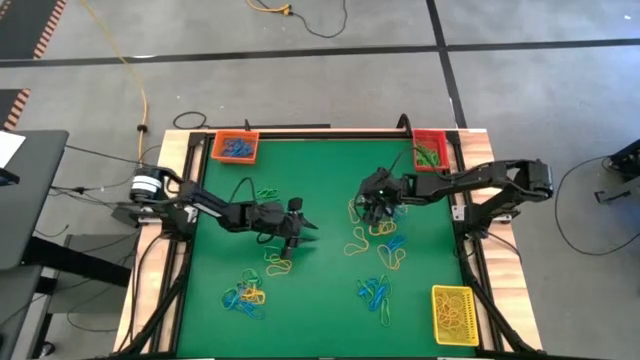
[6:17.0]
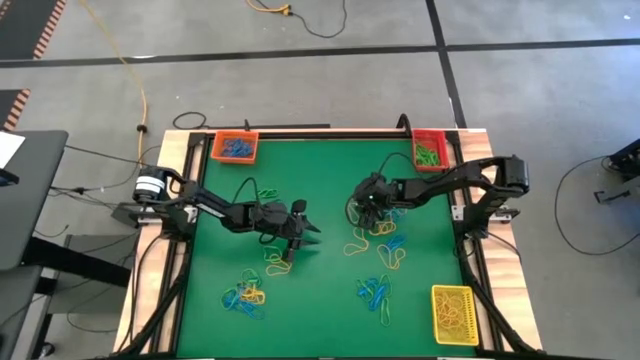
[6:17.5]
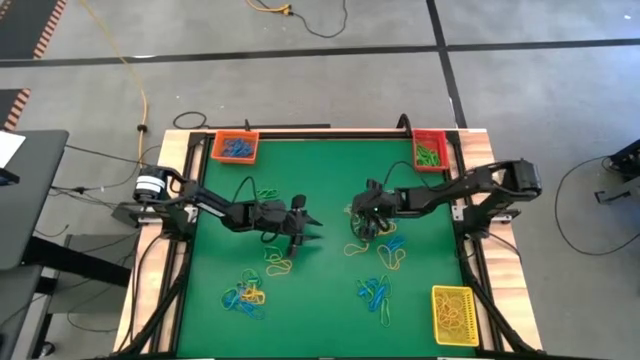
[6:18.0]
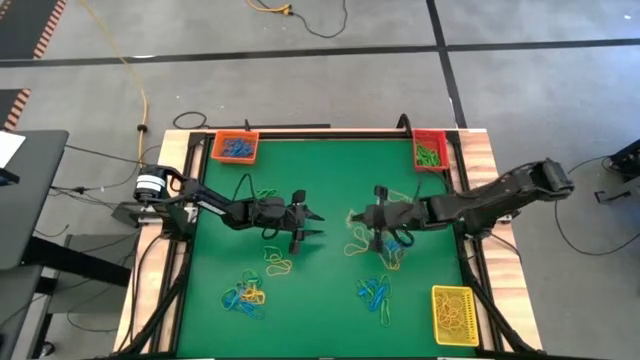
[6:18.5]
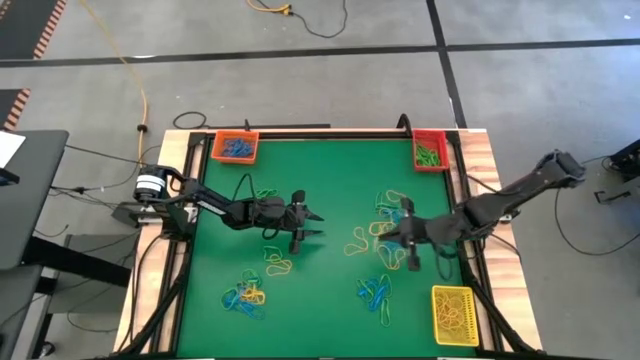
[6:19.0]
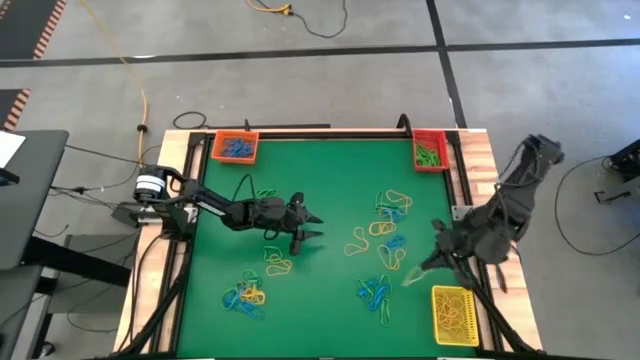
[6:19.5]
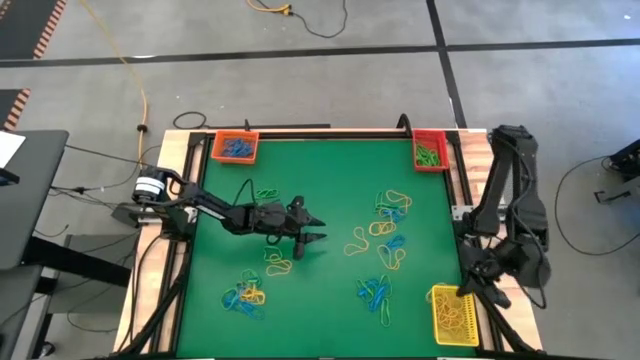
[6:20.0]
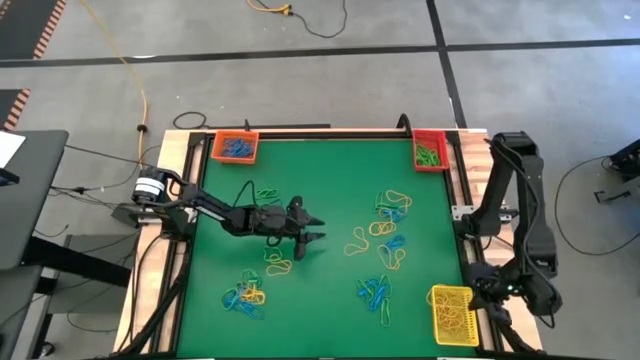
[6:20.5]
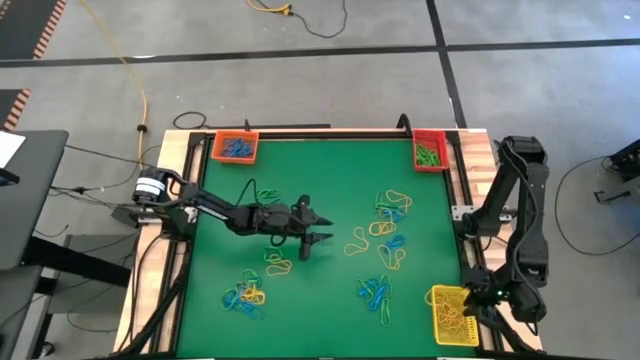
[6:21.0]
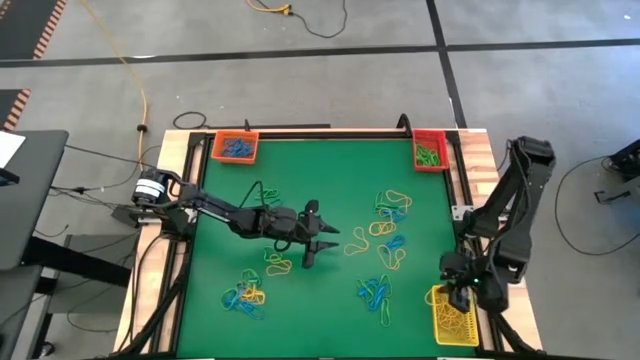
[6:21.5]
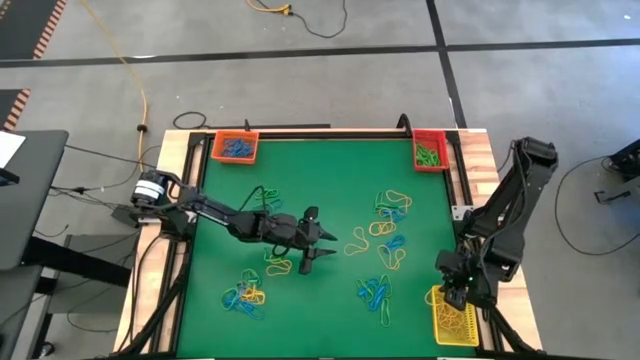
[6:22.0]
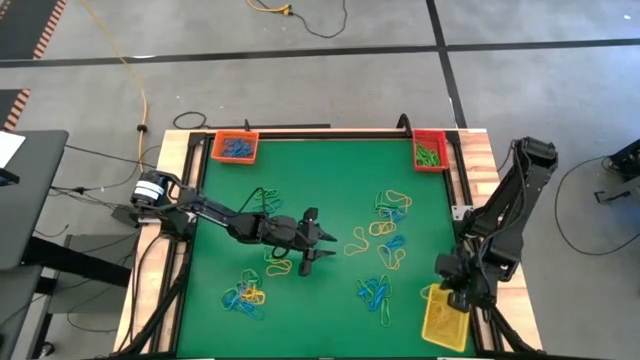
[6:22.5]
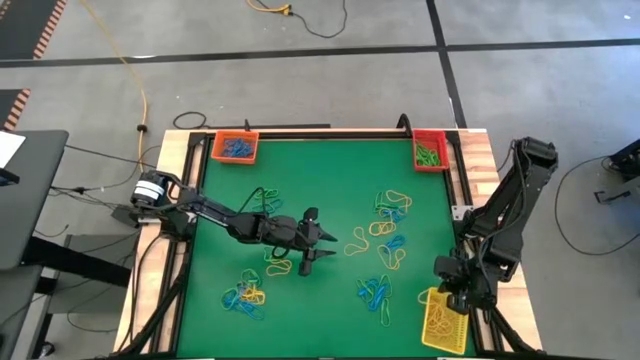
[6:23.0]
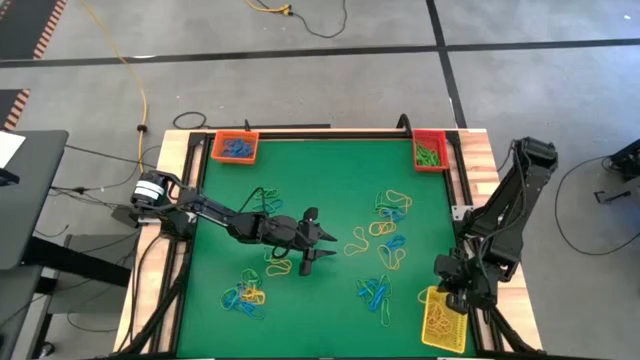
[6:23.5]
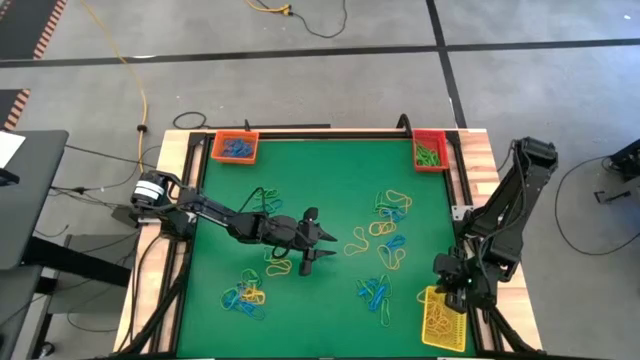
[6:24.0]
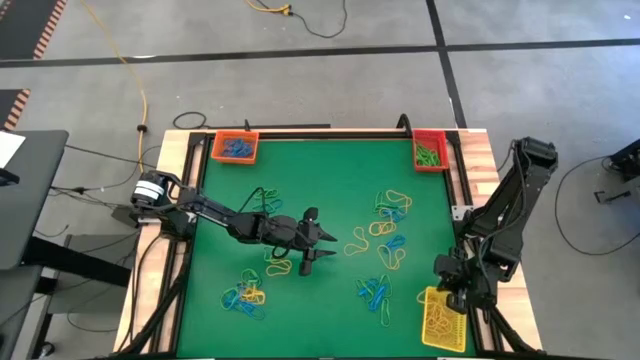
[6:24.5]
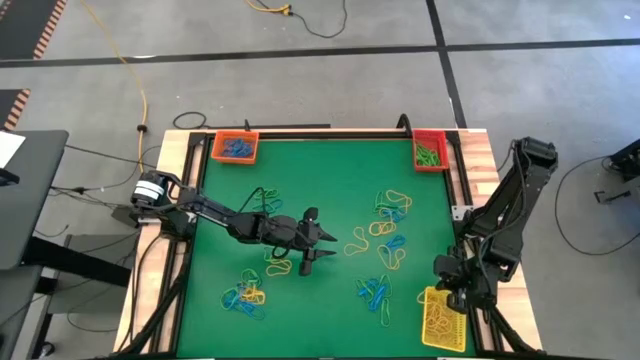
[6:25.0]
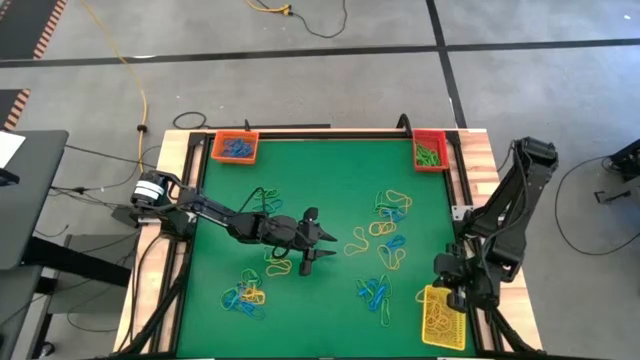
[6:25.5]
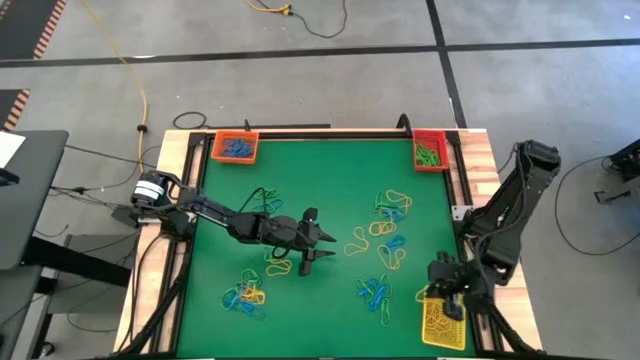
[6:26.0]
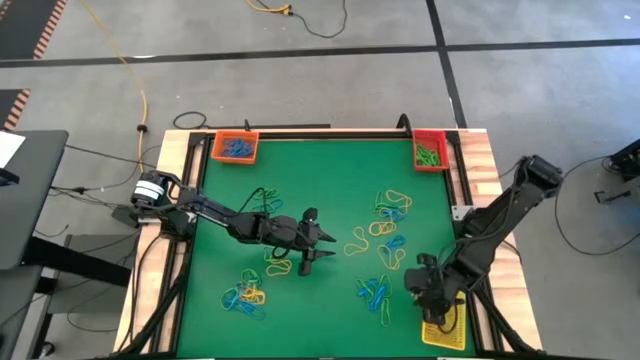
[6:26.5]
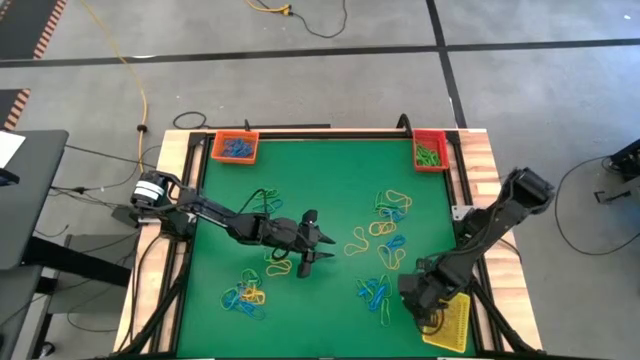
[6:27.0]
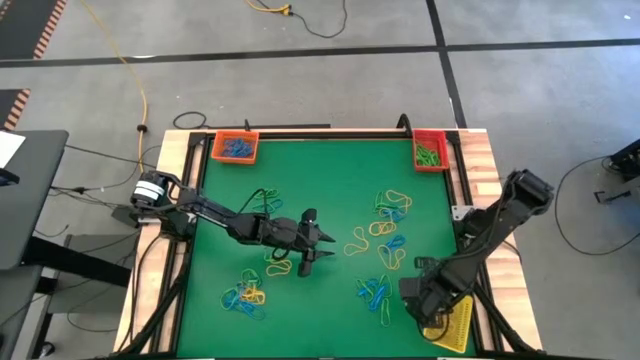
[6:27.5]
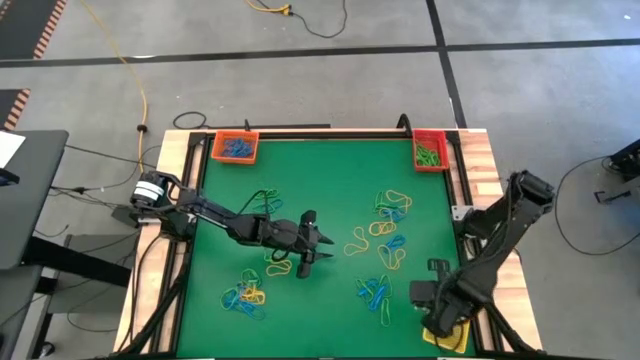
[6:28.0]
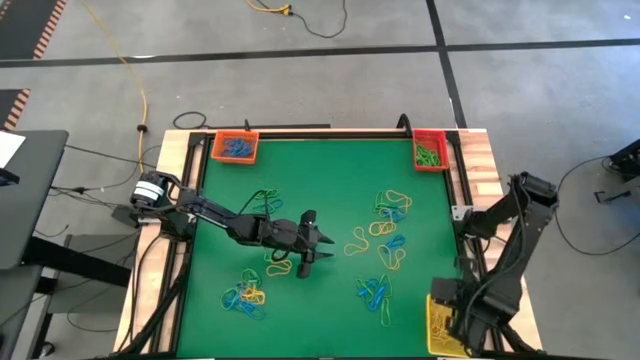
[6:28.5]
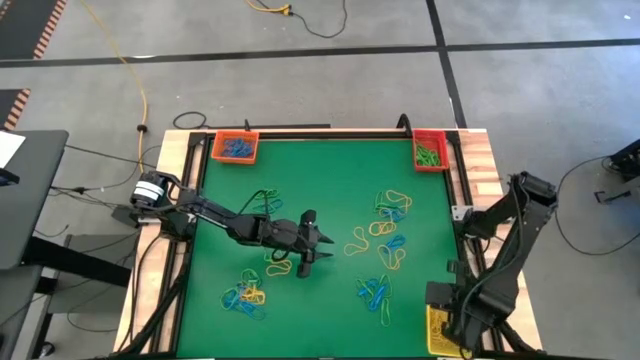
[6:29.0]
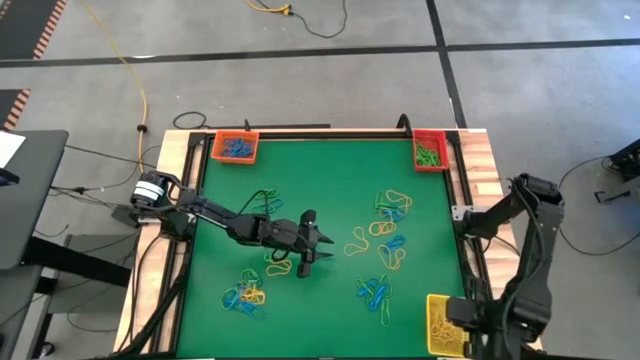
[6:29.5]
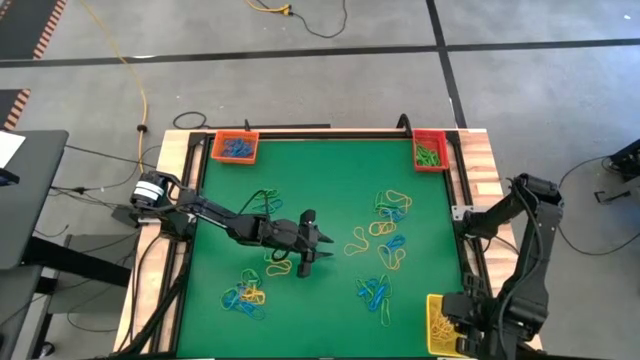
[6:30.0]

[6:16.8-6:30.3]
Task: Sort rubber bands into baskets
Put the top right yellow rubber band into the yellow bin

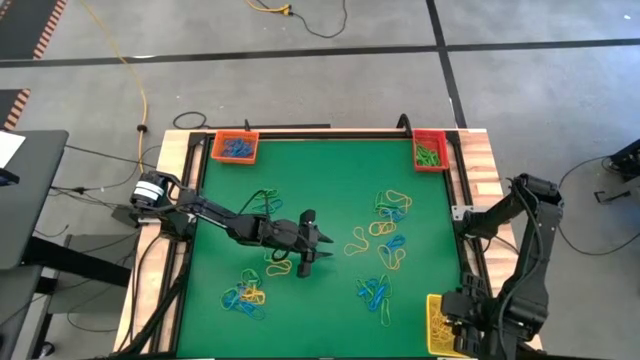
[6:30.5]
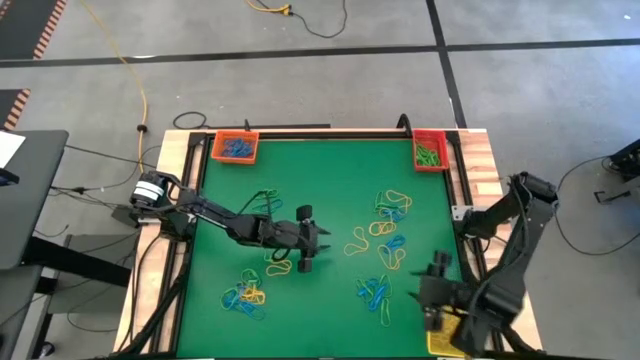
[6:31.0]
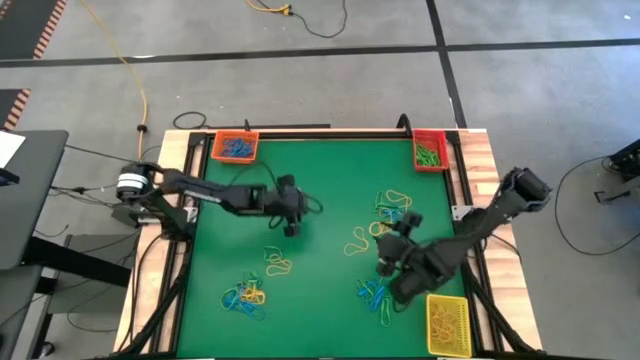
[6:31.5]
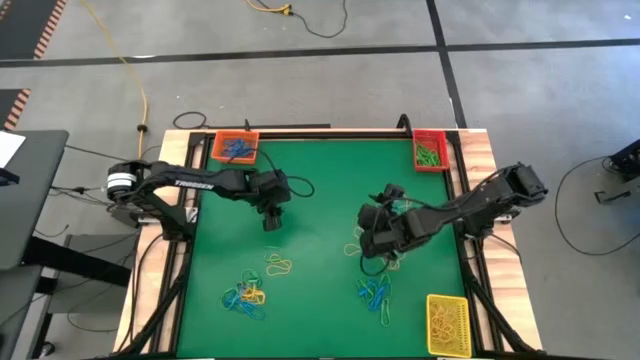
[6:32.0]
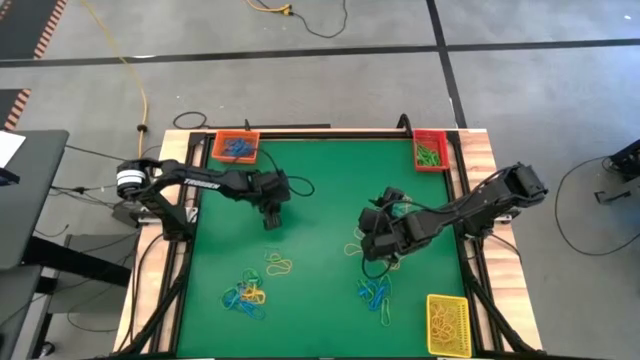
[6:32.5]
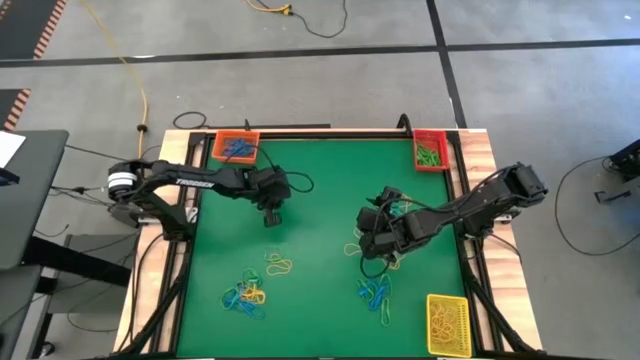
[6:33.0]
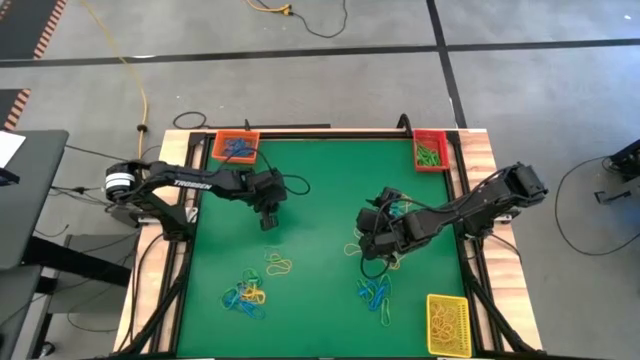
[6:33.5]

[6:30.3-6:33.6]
Put the top left blue rubber band into the orange bin

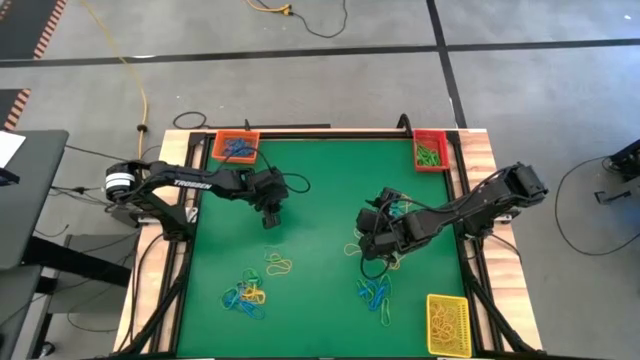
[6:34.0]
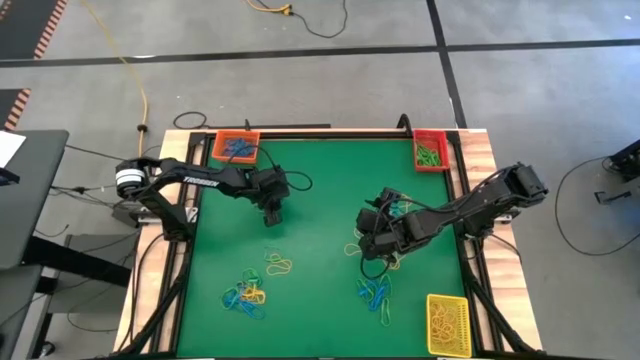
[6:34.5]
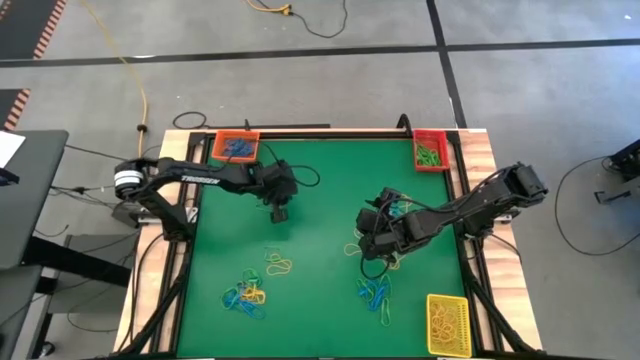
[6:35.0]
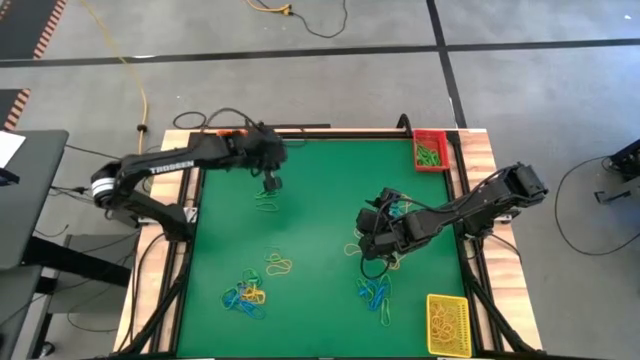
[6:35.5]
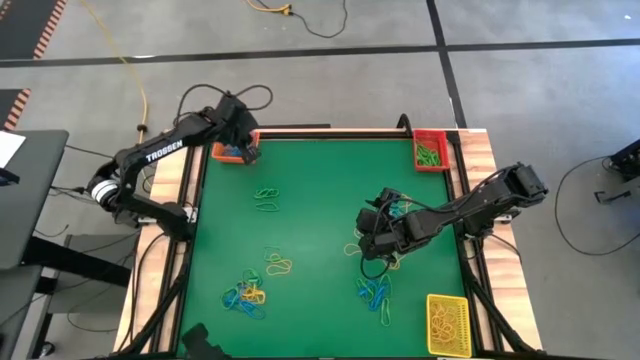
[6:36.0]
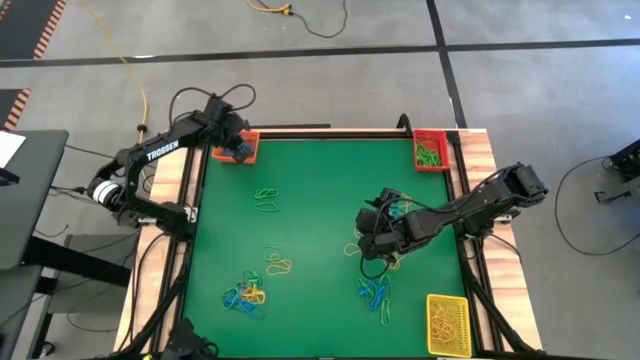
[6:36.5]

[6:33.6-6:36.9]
Put the top left blue rubber band into the orange bin
